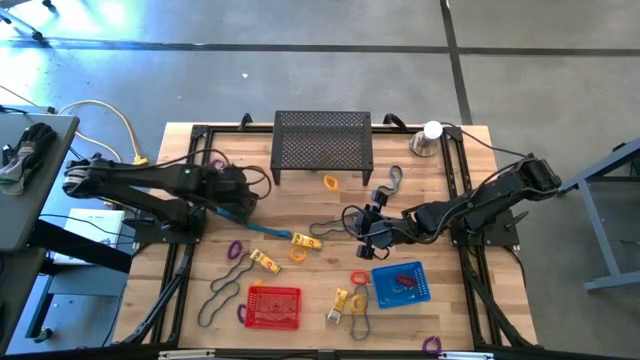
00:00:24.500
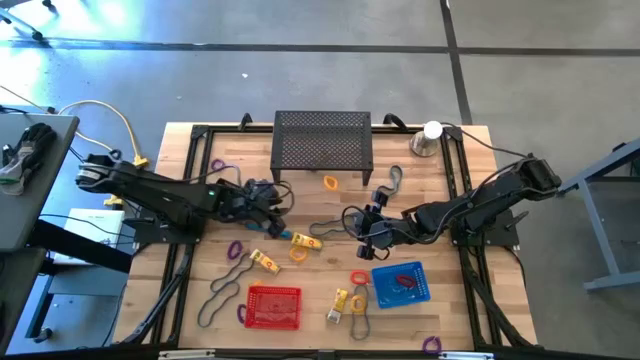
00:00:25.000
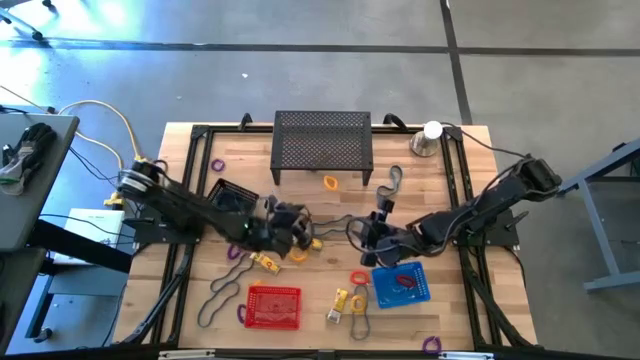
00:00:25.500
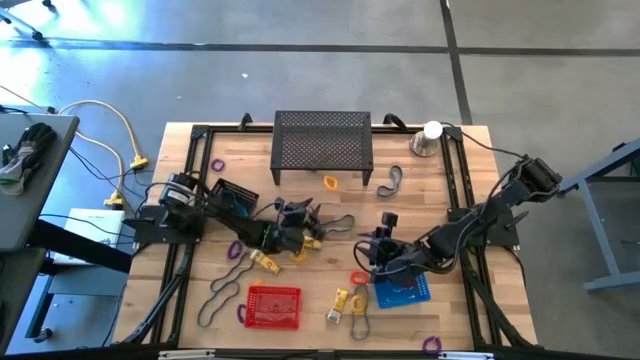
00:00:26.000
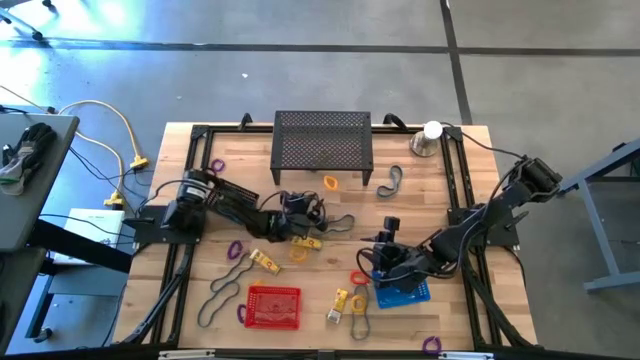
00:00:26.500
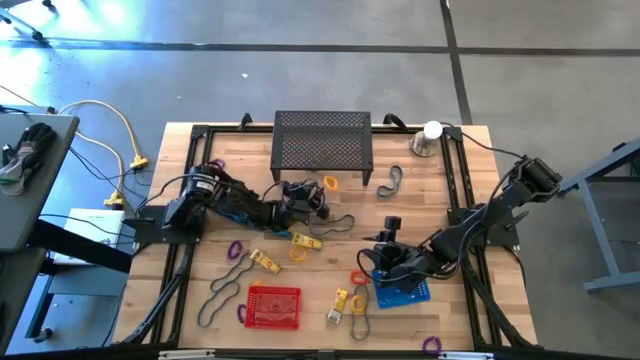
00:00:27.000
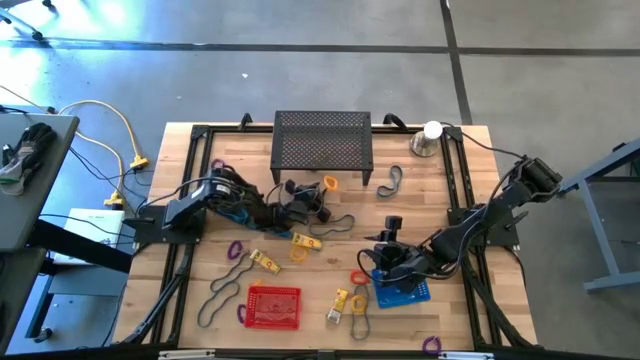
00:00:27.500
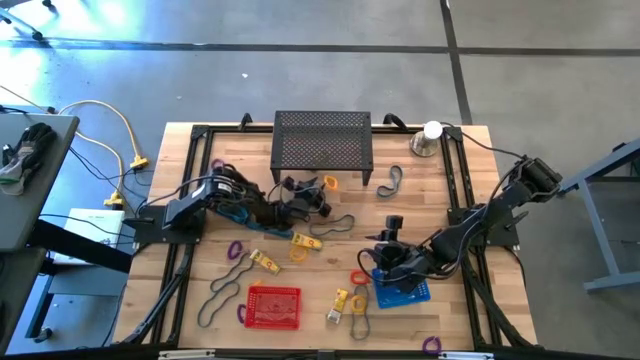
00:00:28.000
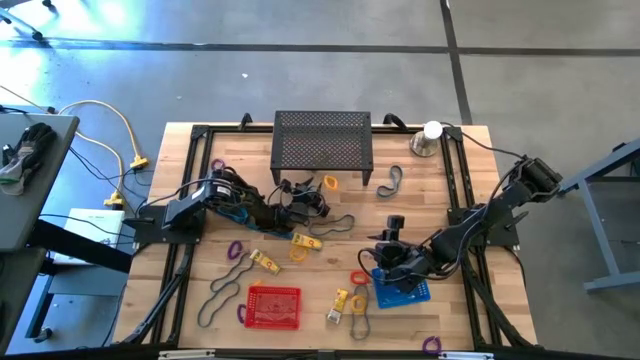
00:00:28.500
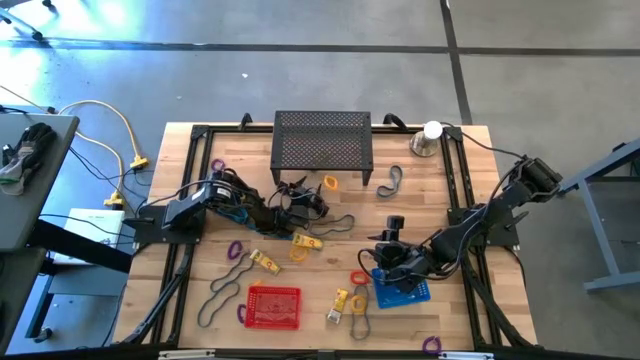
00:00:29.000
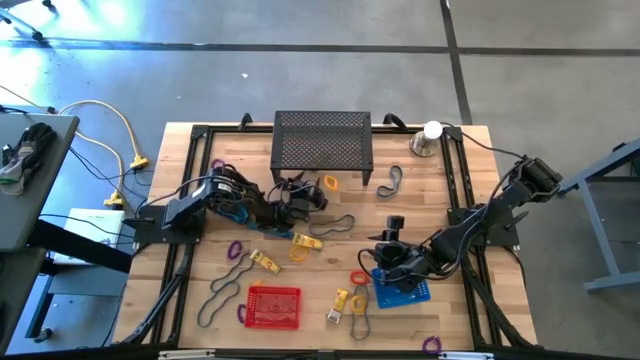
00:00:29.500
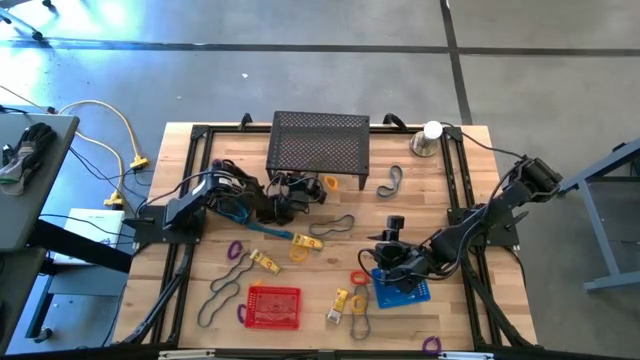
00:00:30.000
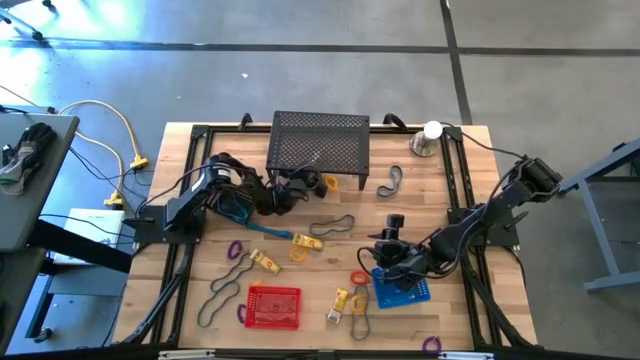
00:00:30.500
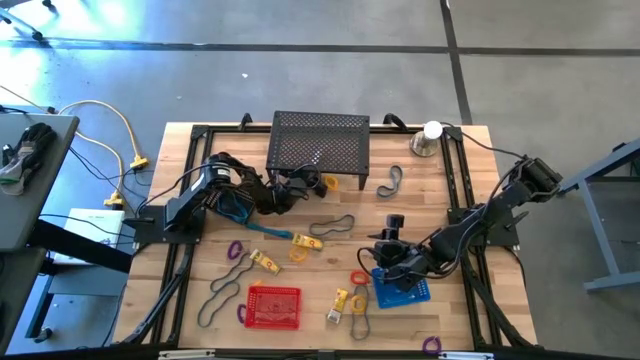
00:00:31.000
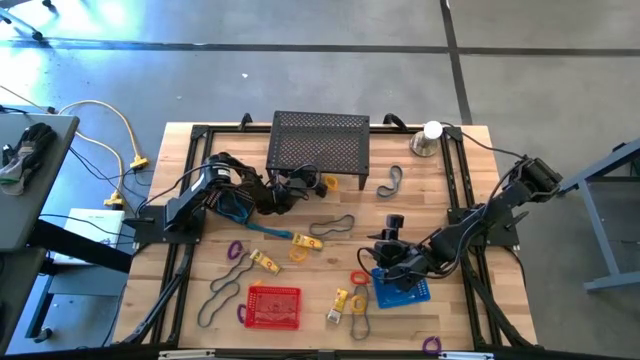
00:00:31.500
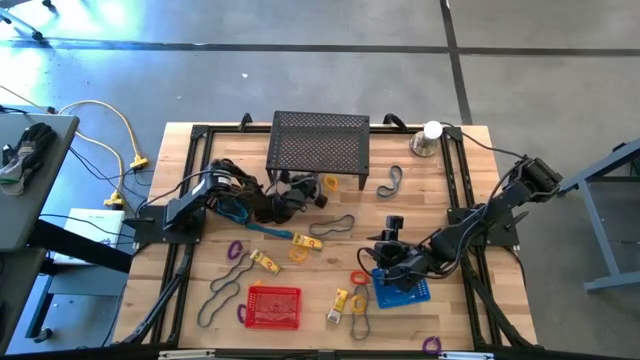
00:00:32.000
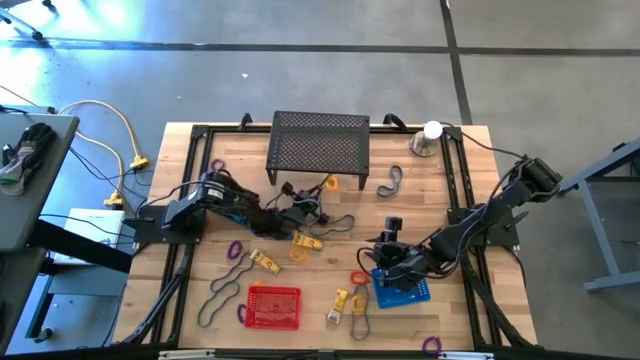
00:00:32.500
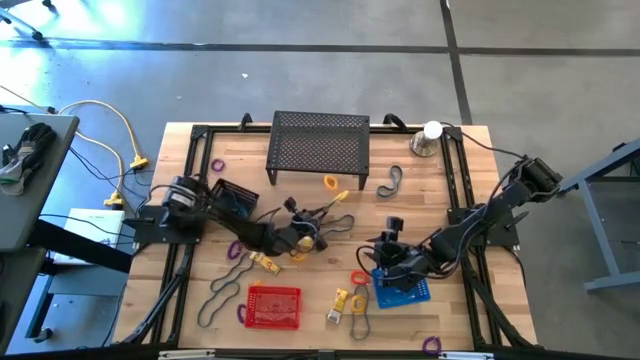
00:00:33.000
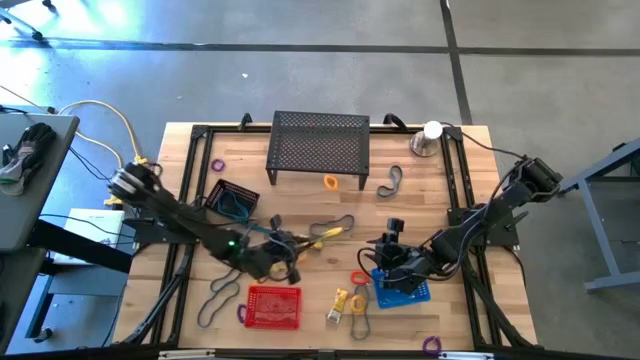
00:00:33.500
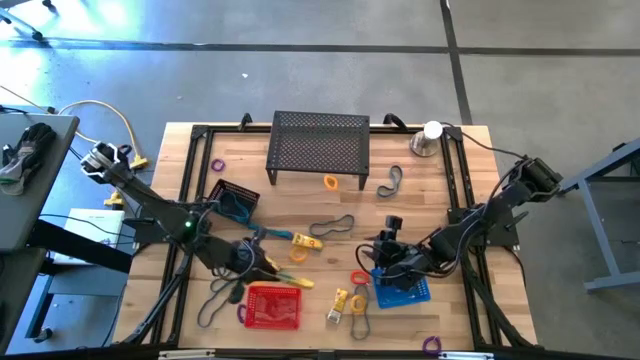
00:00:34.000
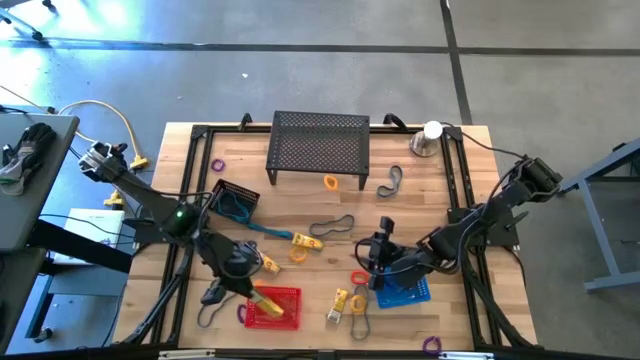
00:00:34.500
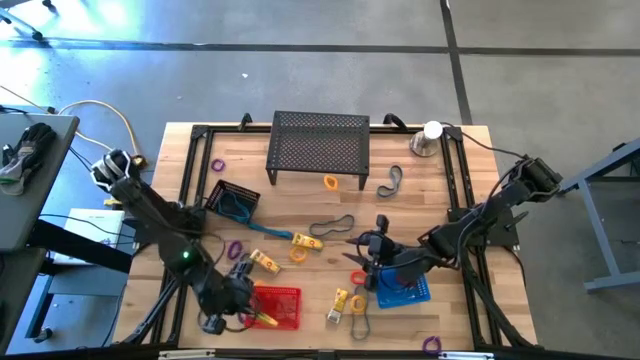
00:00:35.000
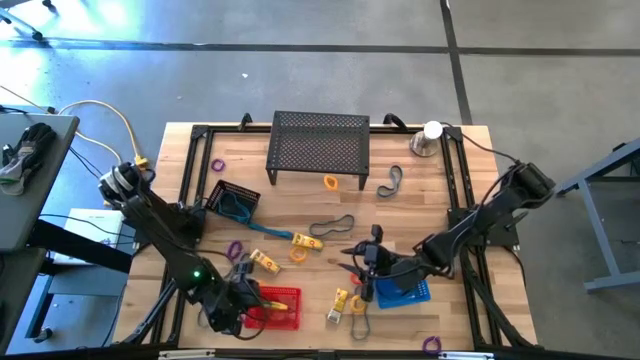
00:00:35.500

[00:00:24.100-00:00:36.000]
Task: Pick & Place Office Desk Supplies
Put the yellow crayon box into the red bin

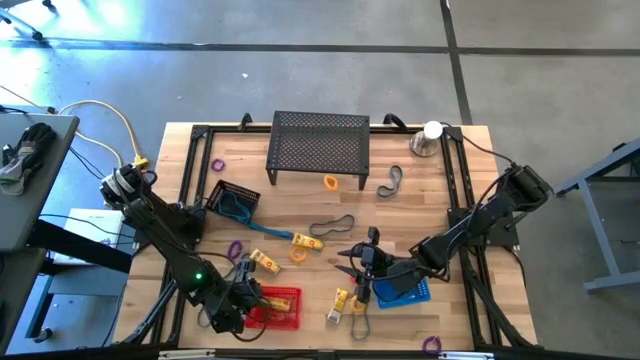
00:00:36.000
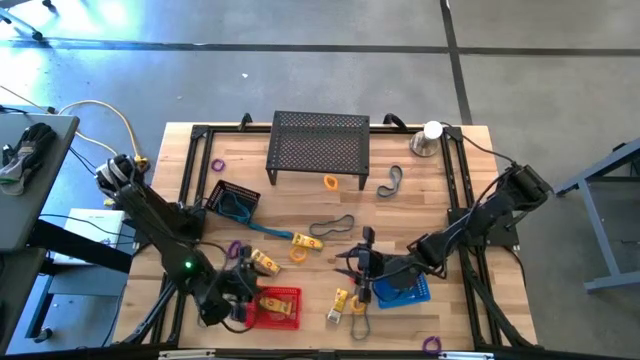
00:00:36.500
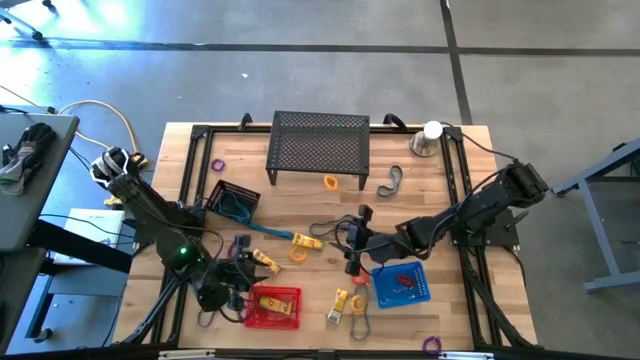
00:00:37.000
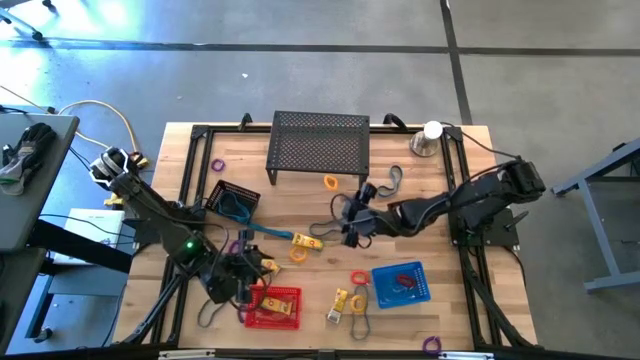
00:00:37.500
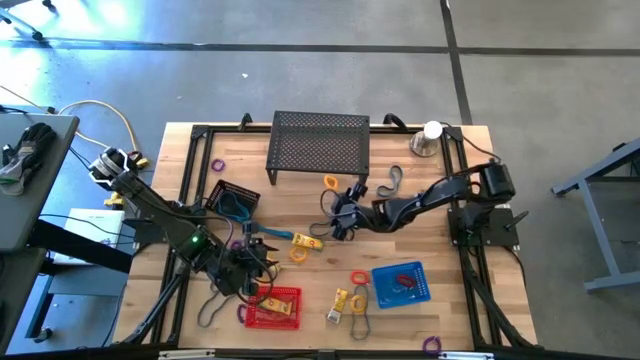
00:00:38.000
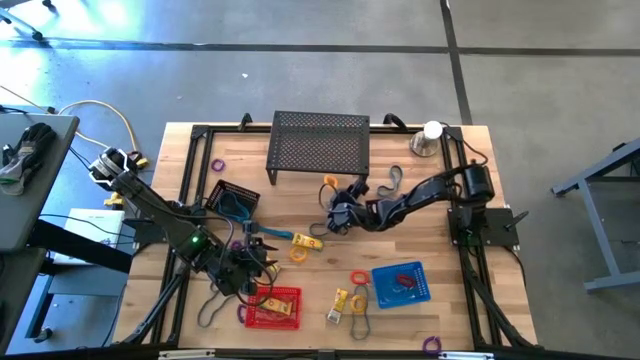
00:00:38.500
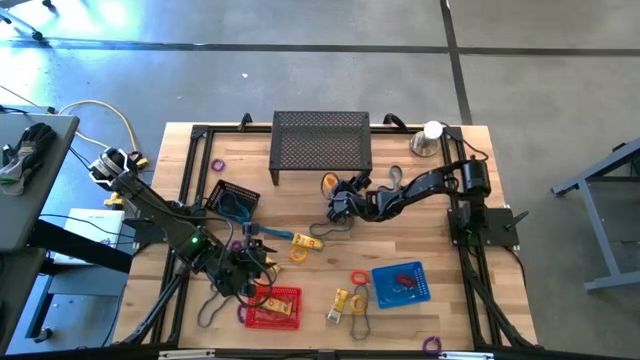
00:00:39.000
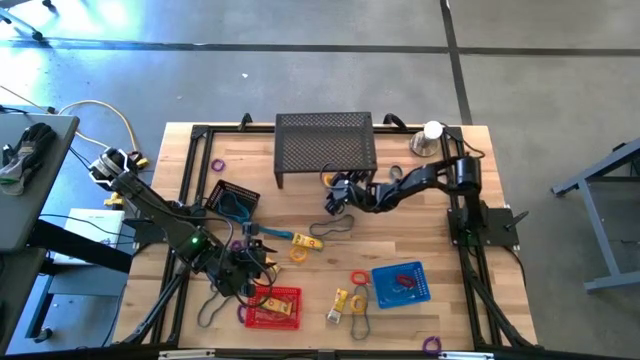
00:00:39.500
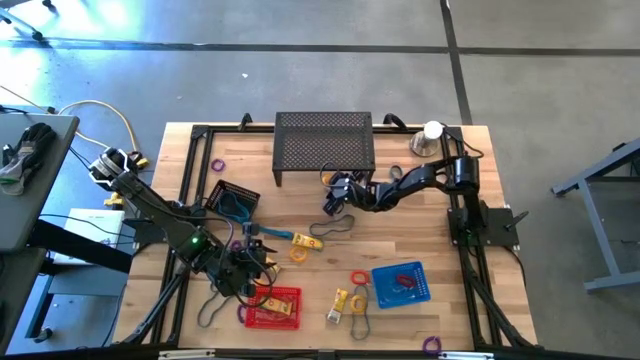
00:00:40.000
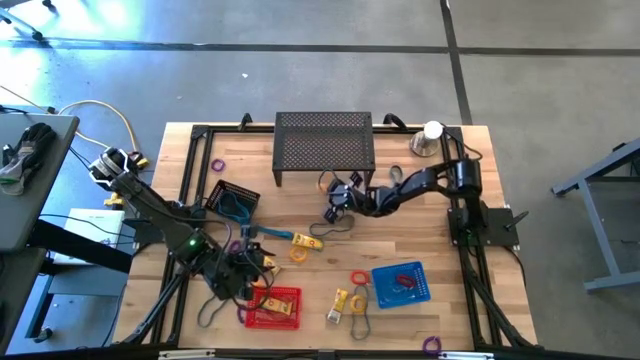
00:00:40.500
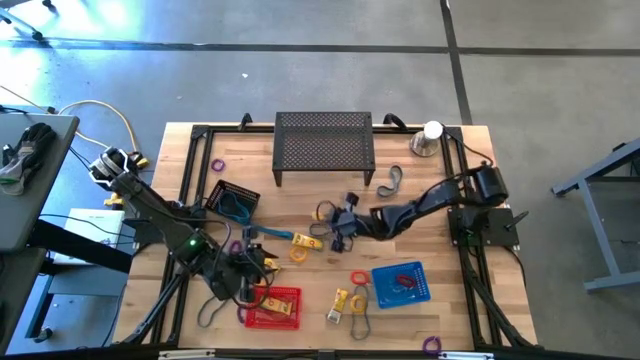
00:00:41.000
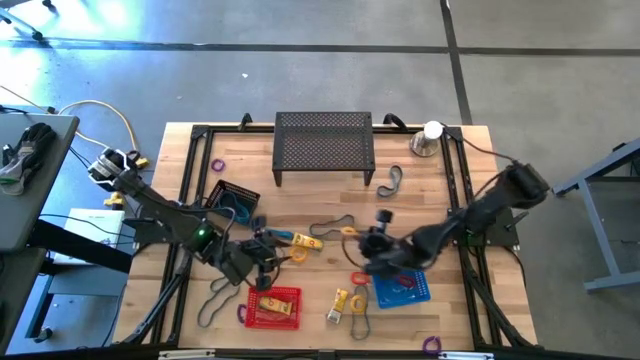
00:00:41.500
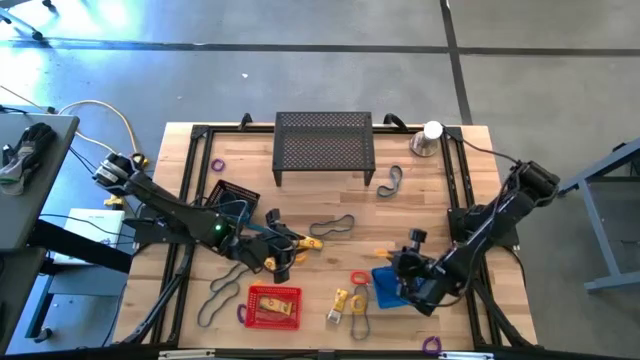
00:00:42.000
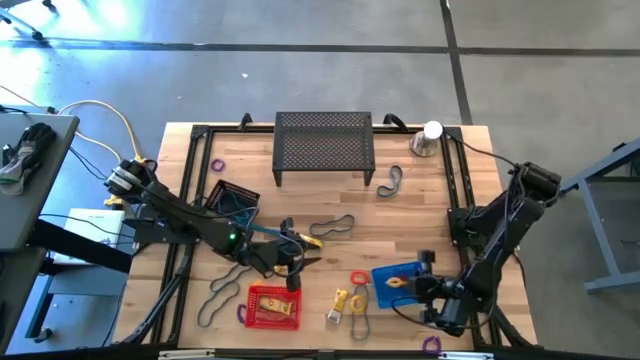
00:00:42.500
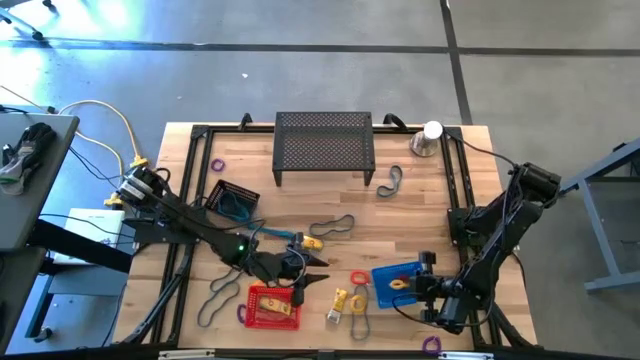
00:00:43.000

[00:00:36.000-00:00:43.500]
Put the yellow spring keychain into the blue bin

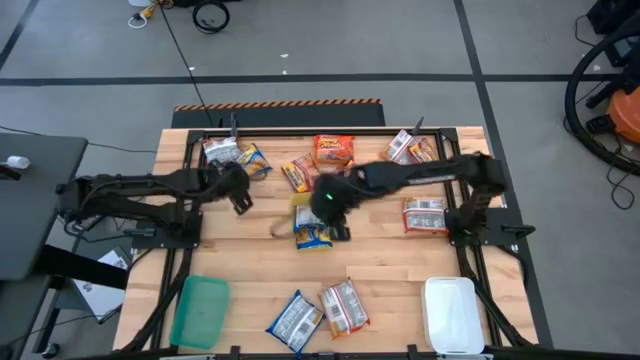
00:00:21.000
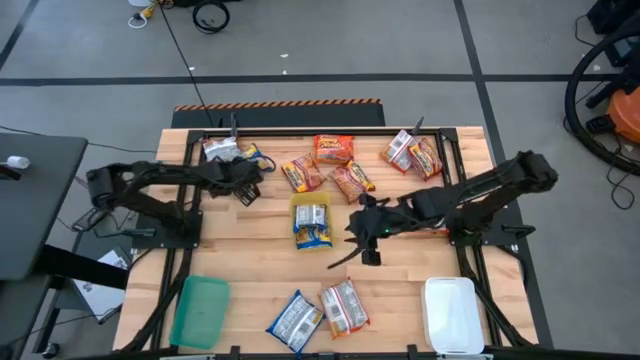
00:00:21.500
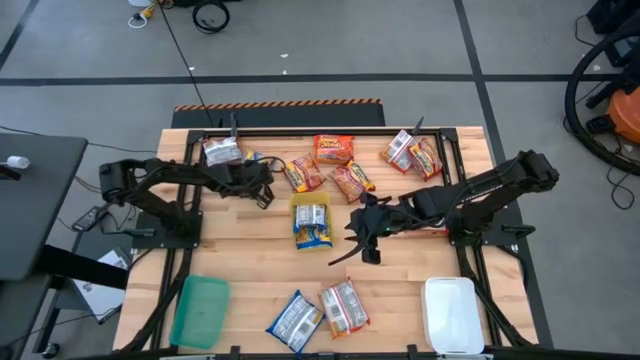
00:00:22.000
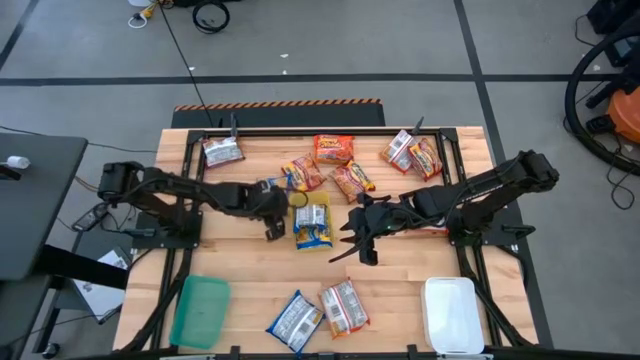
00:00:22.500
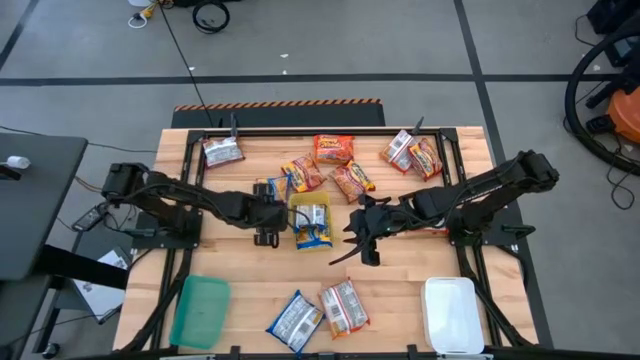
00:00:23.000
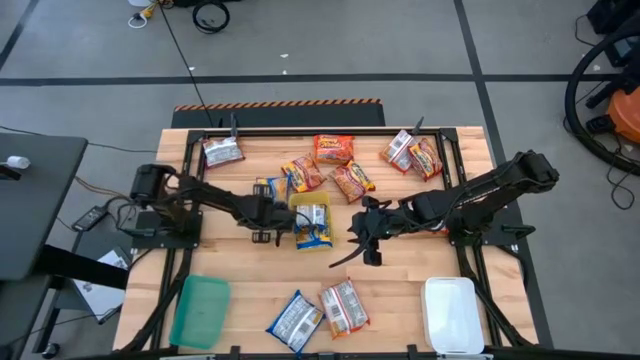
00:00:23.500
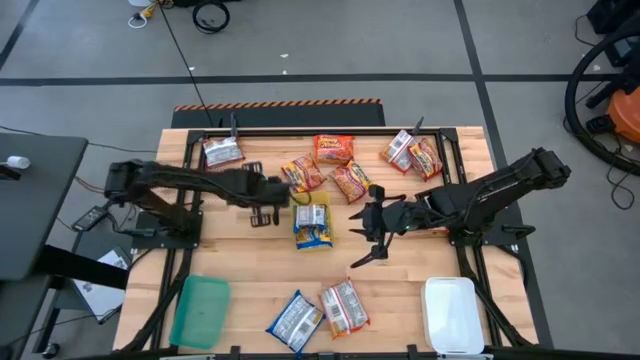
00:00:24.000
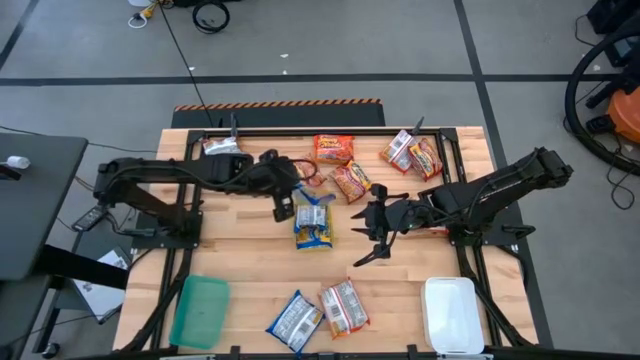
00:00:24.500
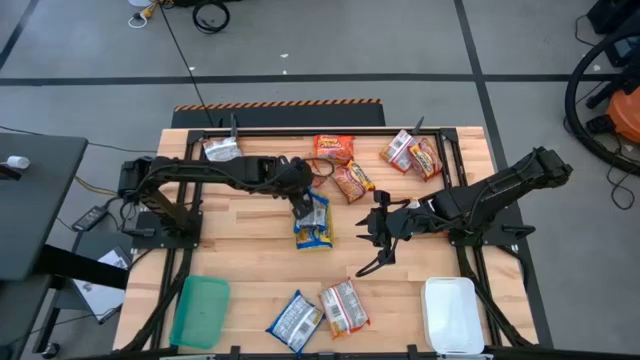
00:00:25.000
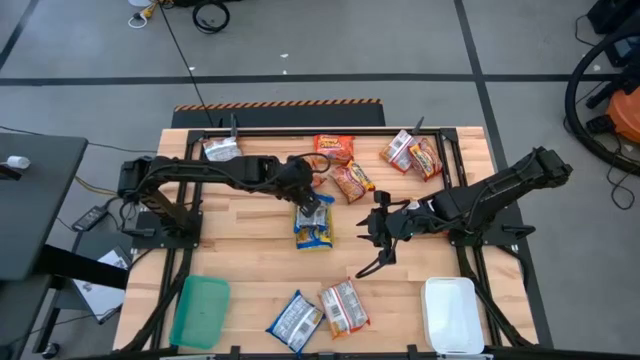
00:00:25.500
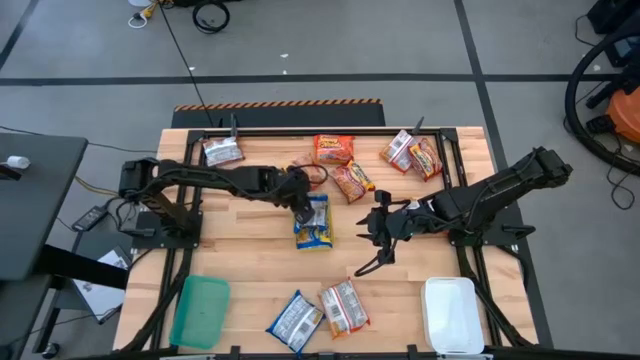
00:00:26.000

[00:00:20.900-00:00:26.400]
Task: Sort Maruchan noodles
Put the blue noodle pack into the yellow bin
